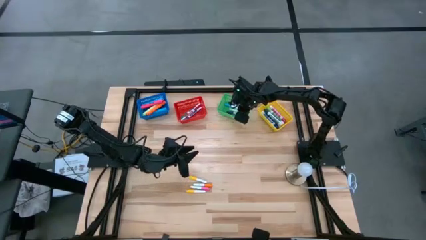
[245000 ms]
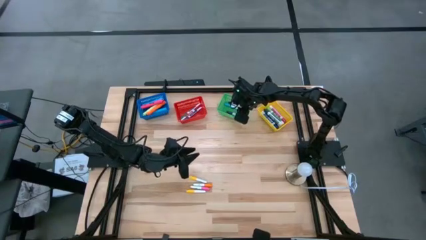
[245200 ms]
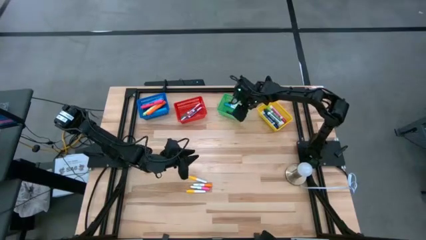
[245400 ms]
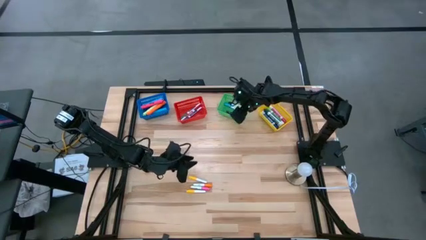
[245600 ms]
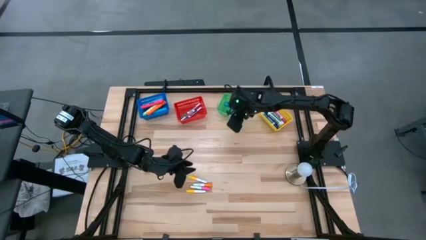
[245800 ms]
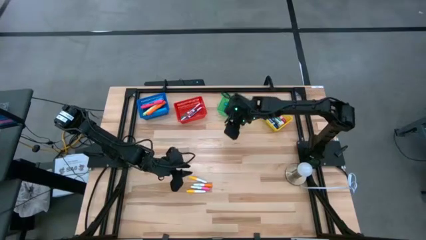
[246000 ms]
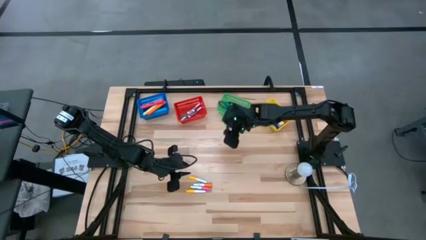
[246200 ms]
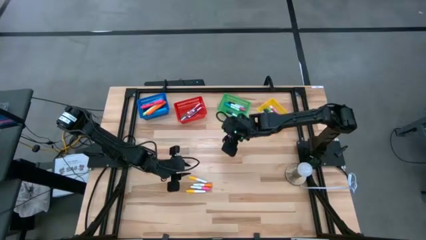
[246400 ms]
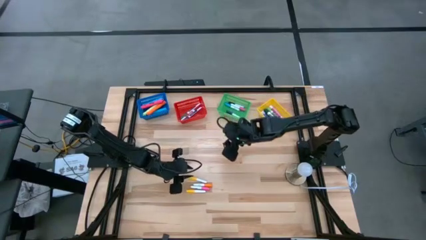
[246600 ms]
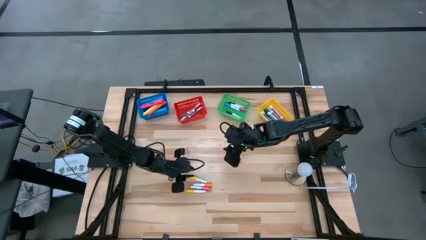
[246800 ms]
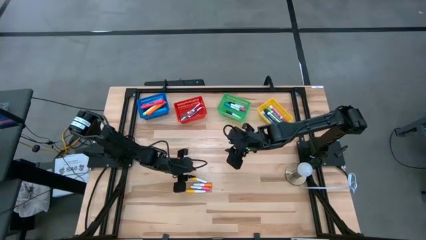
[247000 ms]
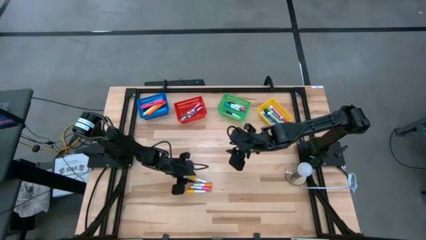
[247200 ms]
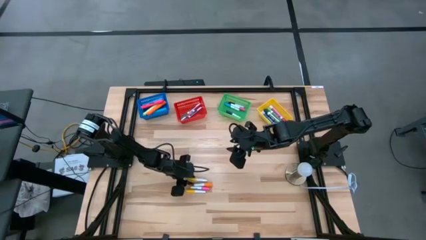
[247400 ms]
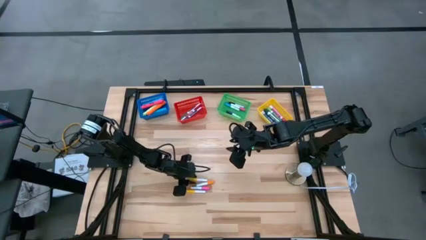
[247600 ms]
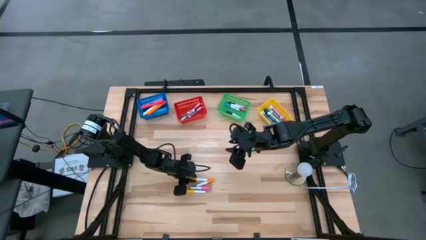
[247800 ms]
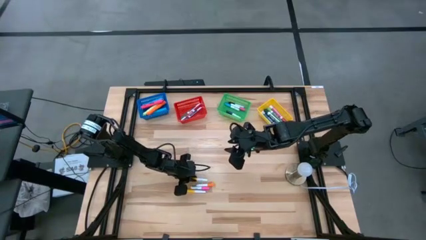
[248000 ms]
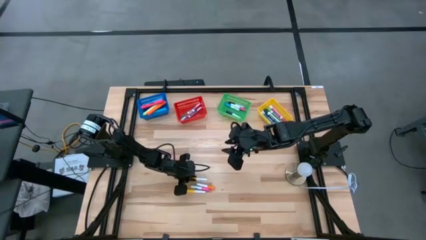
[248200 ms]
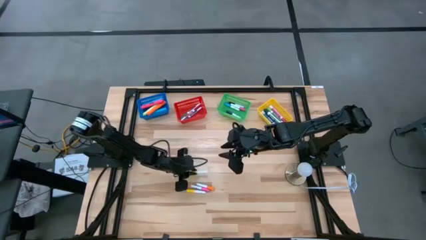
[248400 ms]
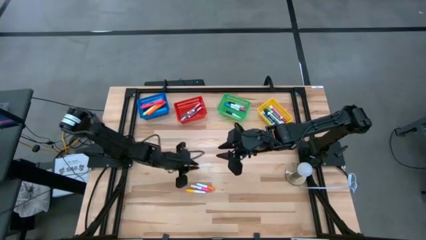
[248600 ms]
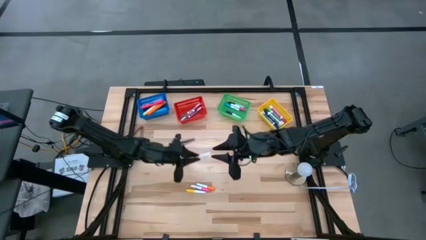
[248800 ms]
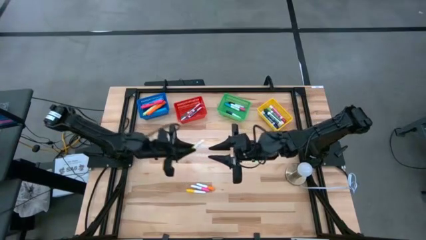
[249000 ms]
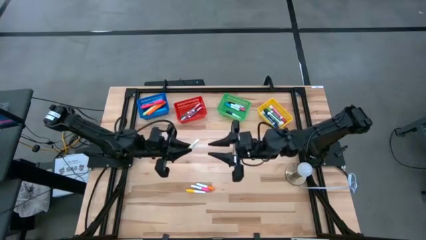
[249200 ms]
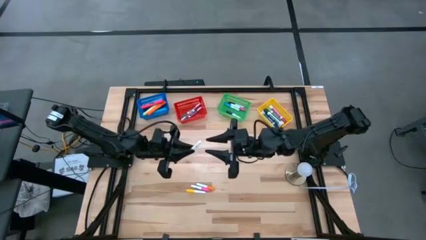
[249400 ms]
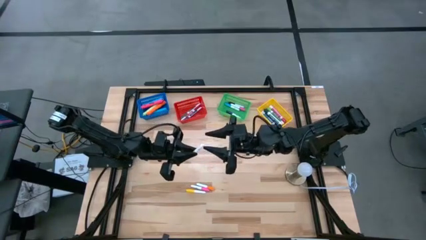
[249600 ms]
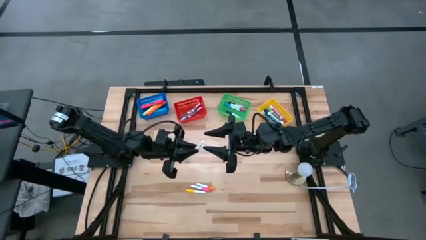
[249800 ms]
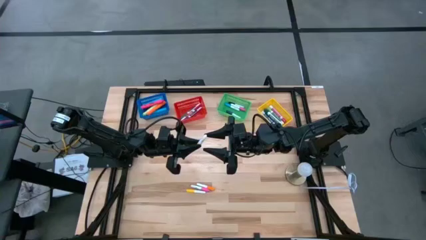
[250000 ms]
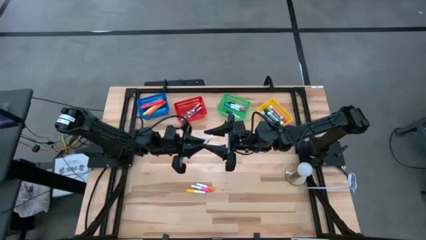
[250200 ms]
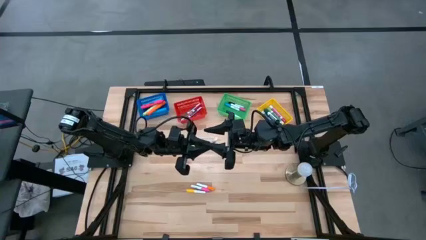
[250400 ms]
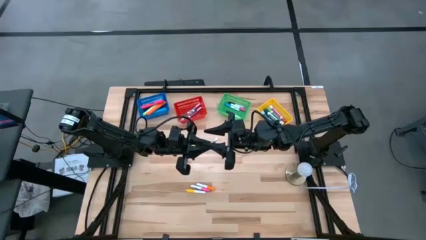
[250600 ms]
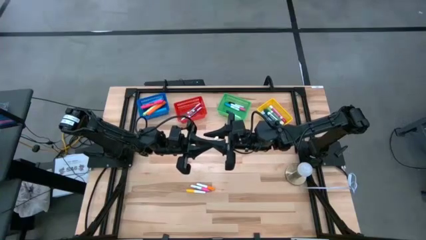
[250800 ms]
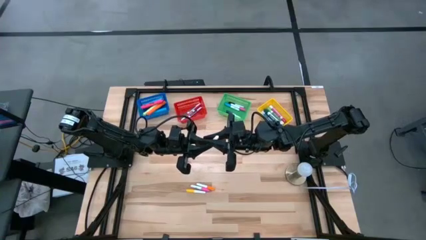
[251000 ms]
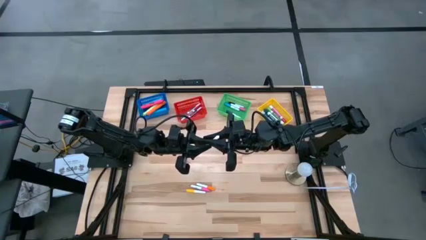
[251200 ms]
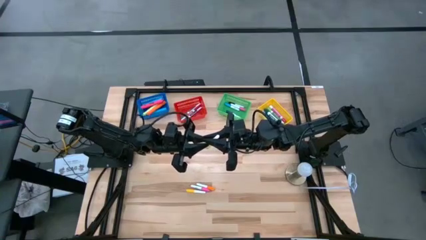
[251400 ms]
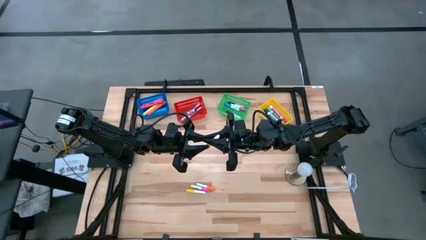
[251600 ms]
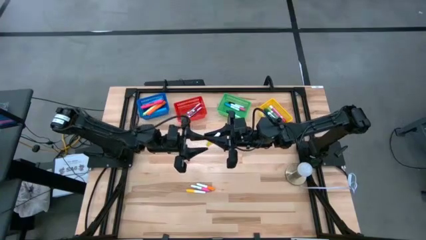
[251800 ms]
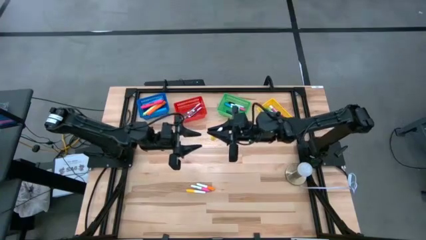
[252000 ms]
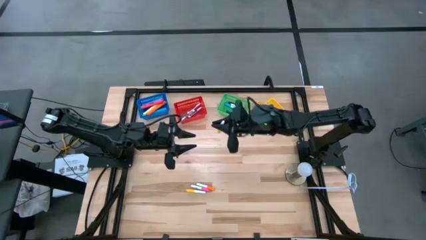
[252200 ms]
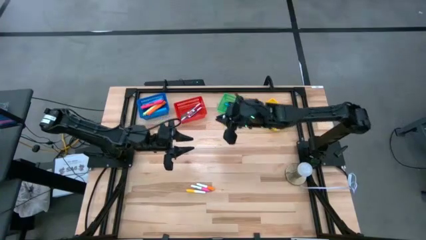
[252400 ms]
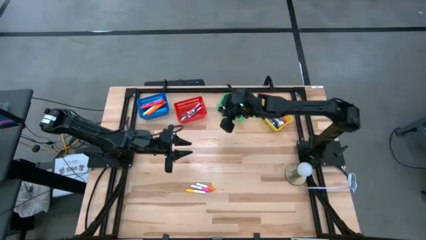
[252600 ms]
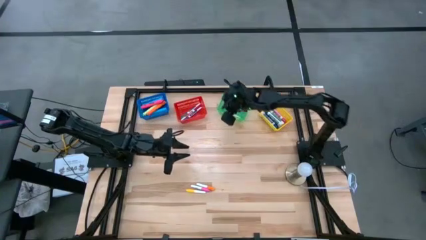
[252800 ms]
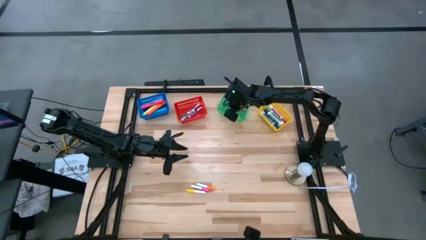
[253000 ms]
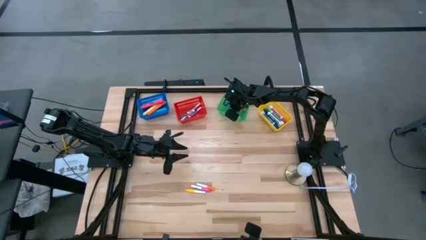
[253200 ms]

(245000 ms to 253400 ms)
Task: Pick & Place Markers
Put the top small yellow highlighter pen into the green bin

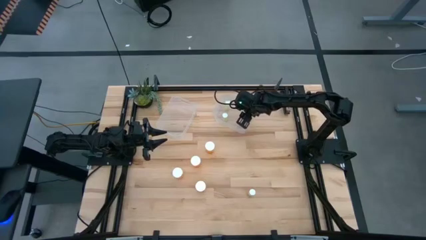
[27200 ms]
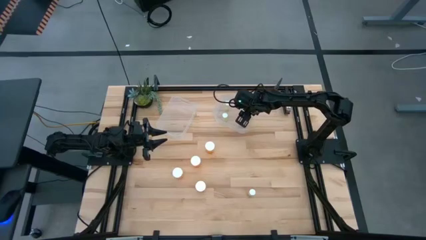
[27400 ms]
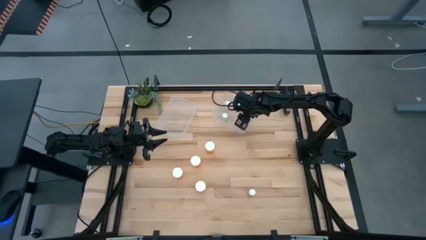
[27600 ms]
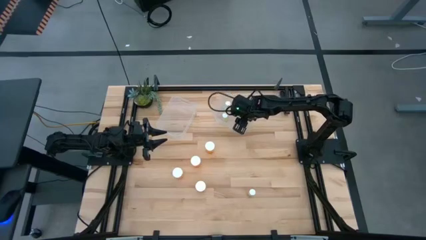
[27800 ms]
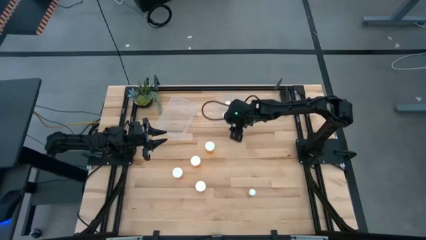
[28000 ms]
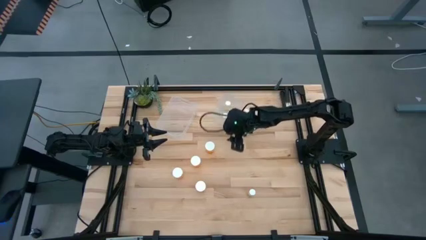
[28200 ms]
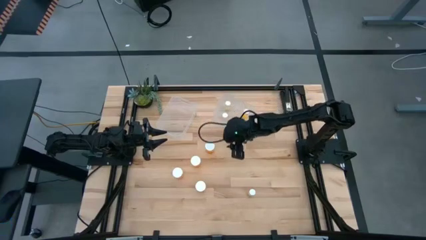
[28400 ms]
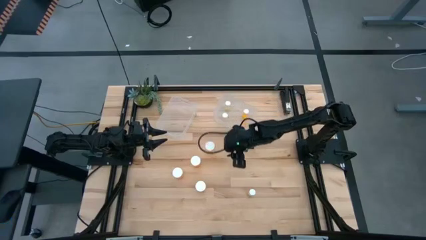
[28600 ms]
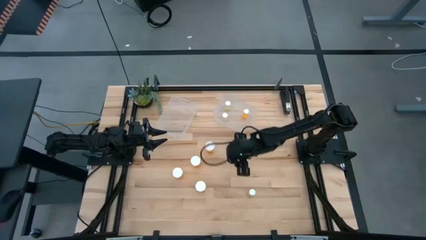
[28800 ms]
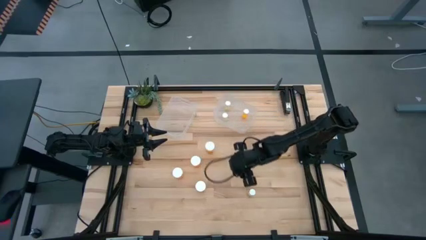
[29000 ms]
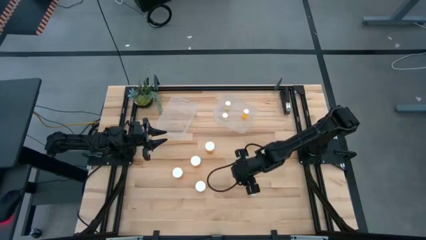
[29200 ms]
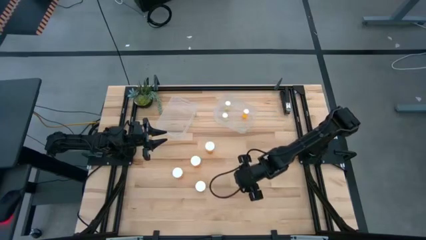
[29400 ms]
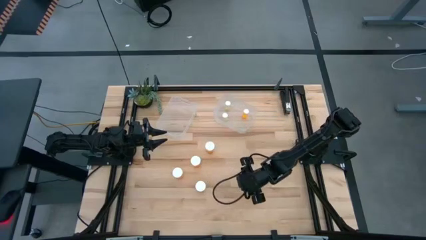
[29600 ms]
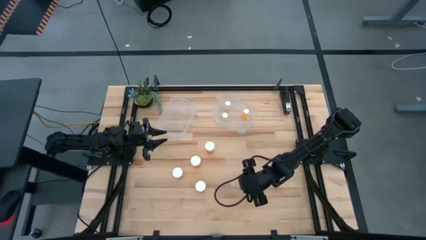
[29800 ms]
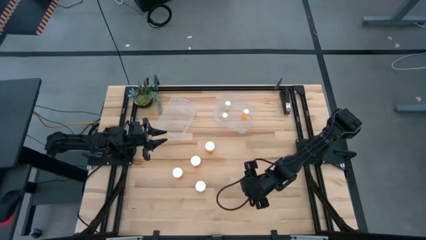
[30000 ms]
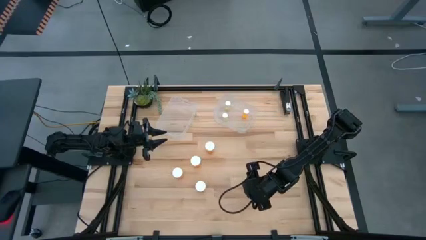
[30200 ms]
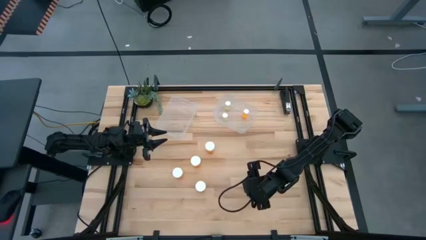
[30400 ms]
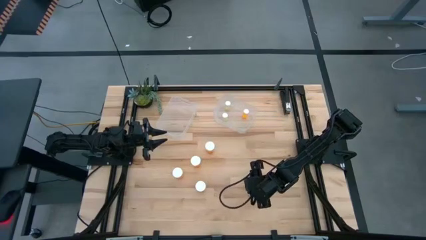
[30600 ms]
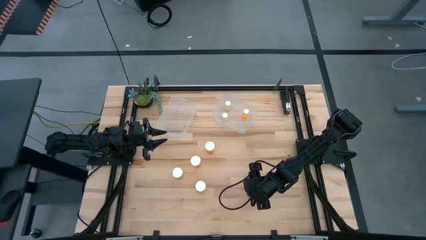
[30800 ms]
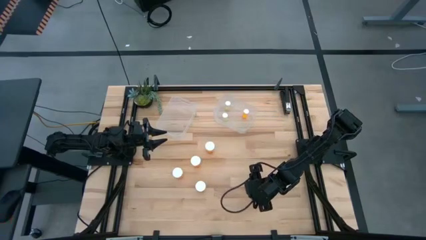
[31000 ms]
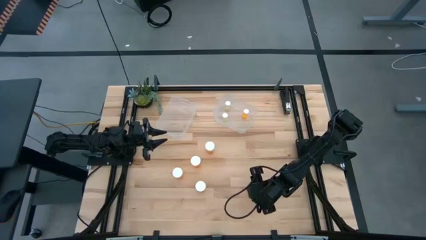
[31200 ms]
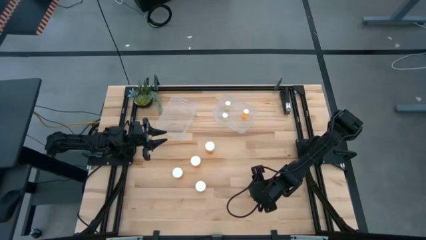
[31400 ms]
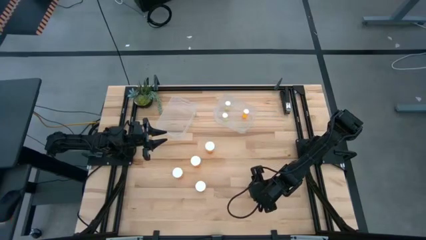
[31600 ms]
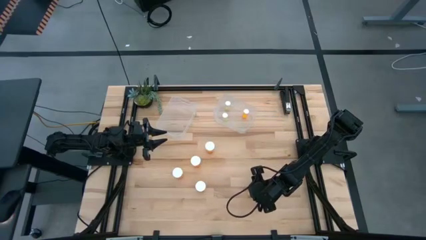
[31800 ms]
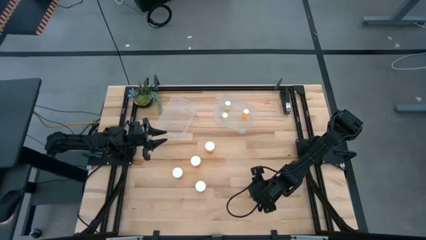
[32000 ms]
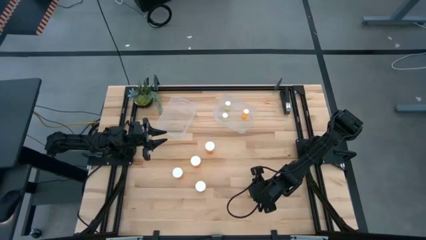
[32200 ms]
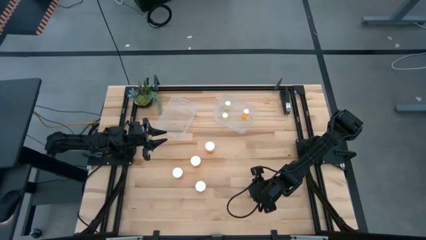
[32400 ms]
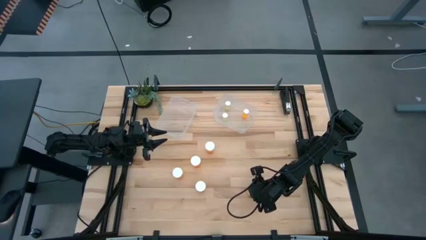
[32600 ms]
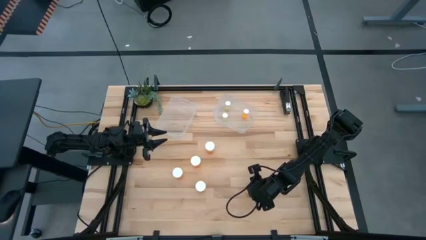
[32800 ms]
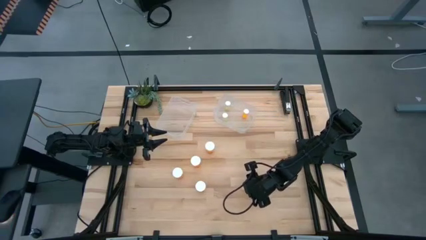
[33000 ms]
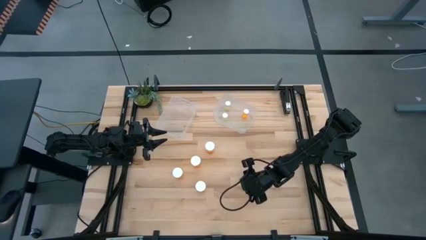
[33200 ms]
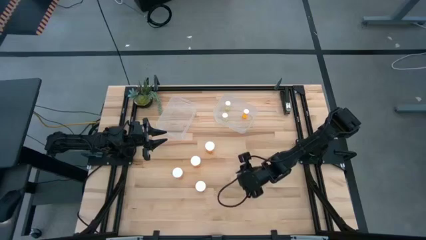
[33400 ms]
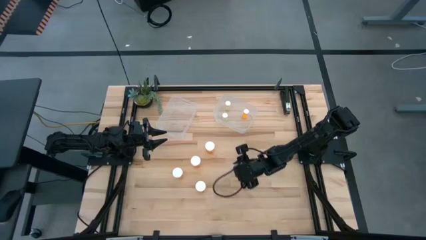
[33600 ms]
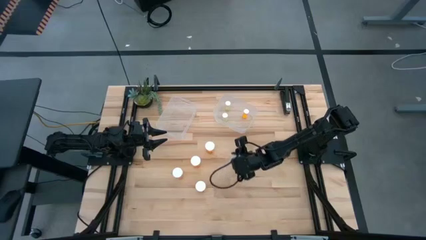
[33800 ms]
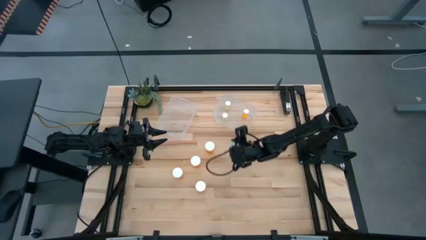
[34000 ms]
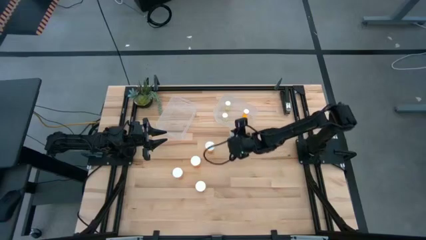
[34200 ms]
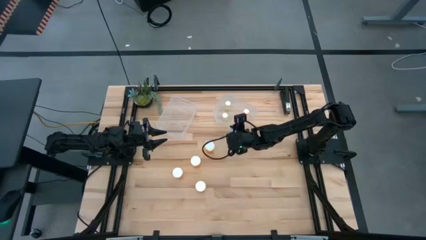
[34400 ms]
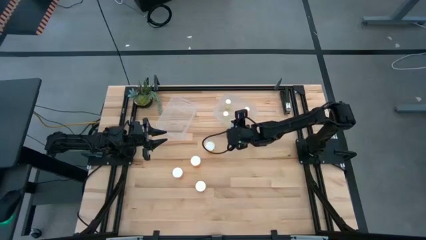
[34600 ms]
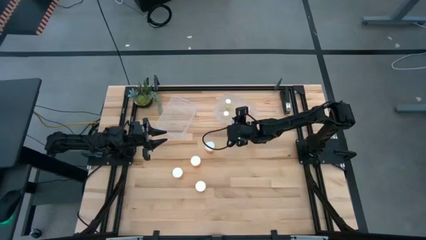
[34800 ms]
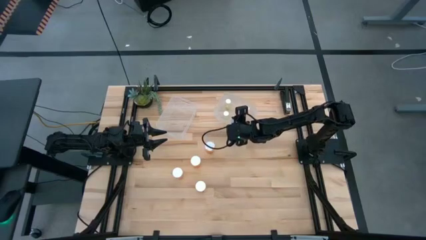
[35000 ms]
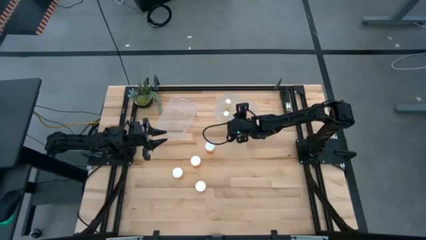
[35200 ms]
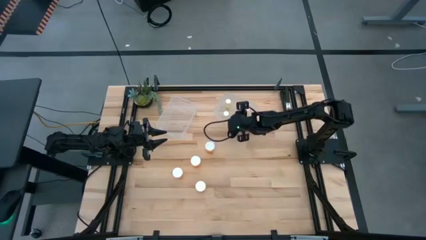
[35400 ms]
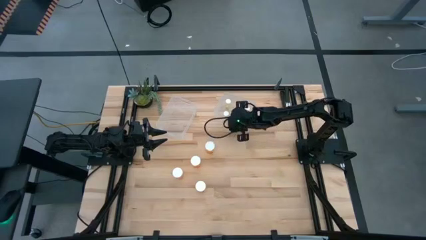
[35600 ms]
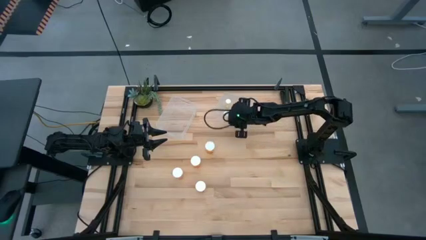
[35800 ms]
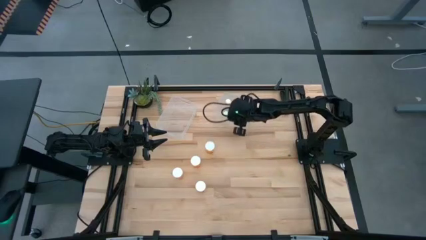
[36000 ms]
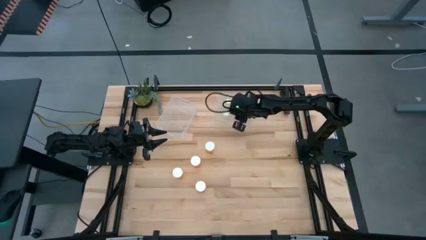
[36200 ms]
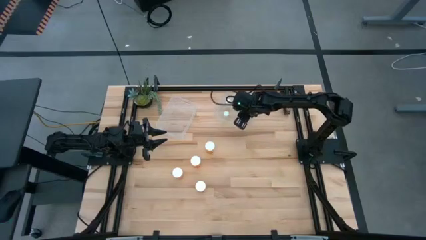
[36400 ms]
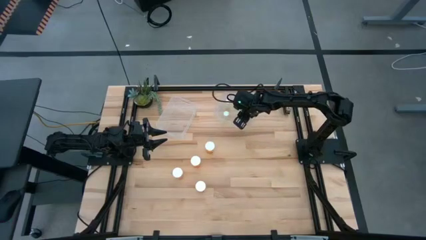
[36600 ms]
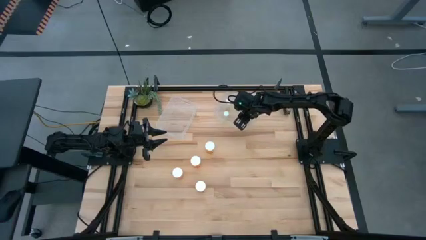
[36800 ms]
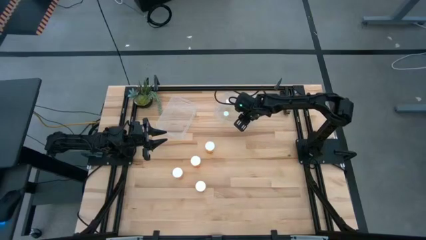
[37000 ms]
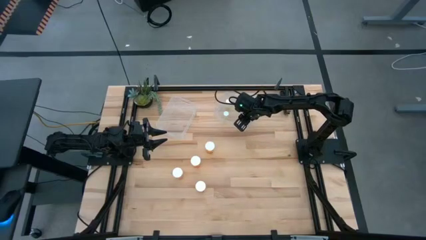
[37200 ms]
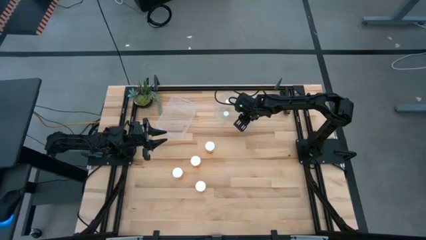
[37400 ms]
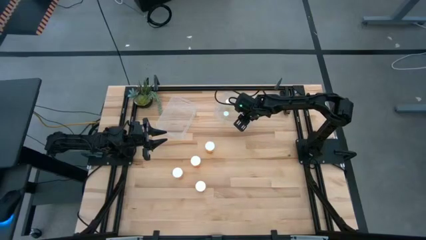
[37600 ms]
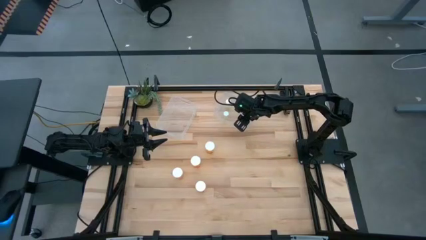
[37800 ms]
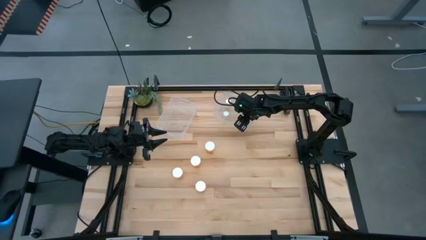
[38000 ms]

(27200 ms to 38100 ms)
Task: Pick and place medicine bottles into bin by pill shape (circle, oval)
Put the small yellow pill bottle into the right transparent bin
